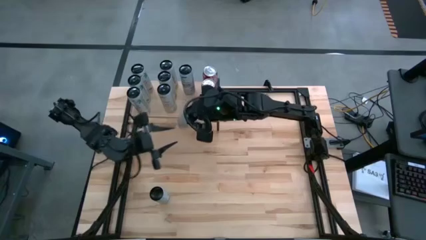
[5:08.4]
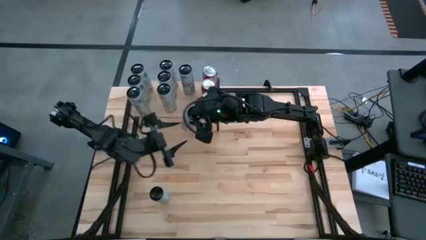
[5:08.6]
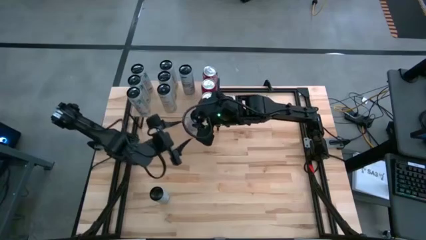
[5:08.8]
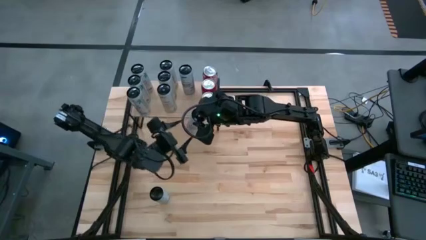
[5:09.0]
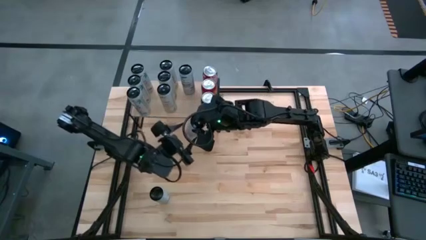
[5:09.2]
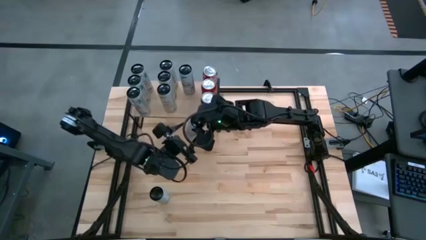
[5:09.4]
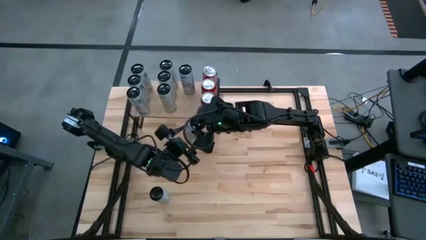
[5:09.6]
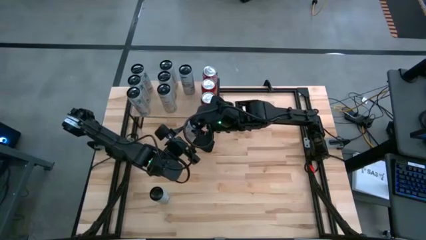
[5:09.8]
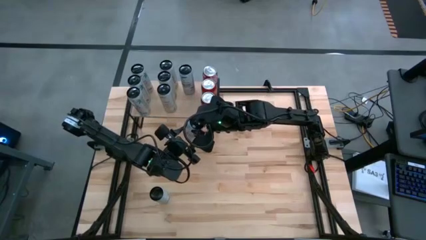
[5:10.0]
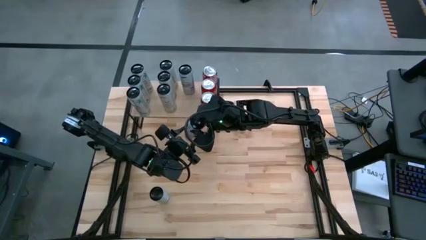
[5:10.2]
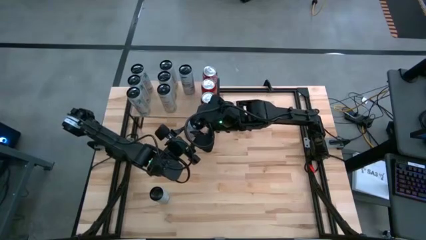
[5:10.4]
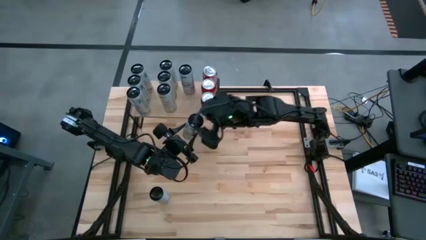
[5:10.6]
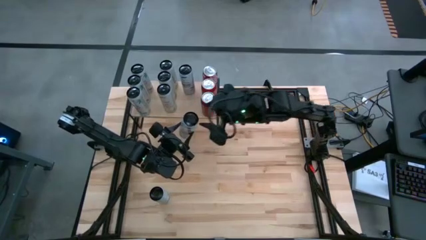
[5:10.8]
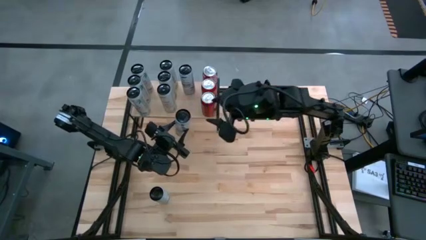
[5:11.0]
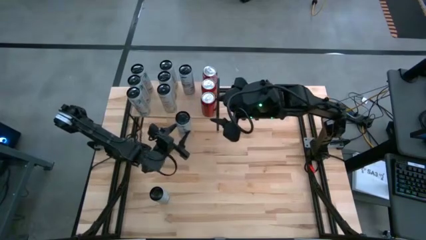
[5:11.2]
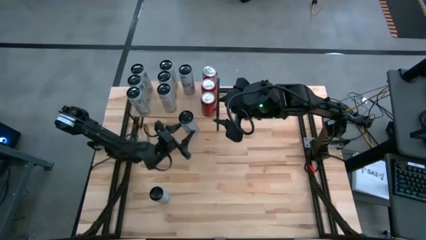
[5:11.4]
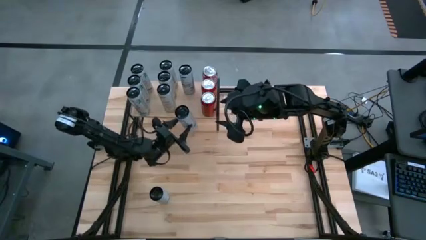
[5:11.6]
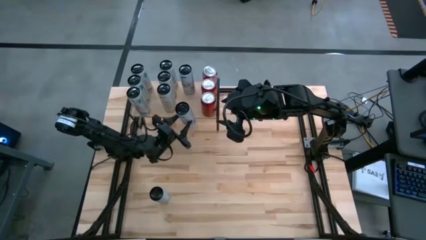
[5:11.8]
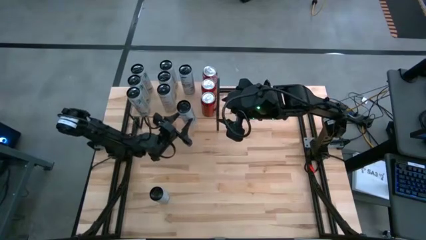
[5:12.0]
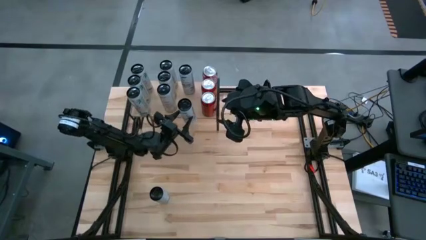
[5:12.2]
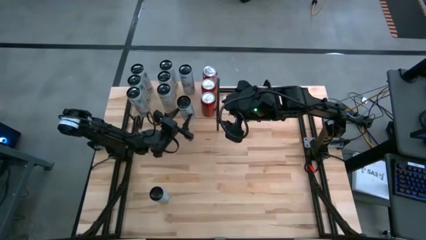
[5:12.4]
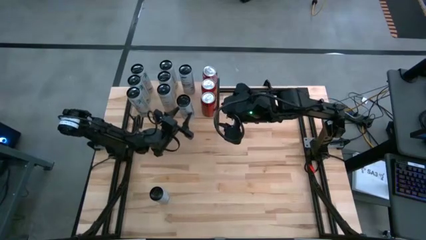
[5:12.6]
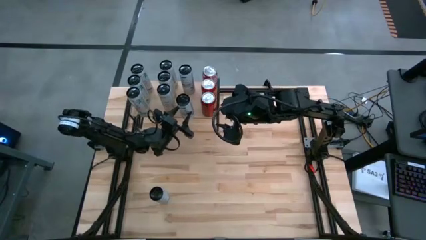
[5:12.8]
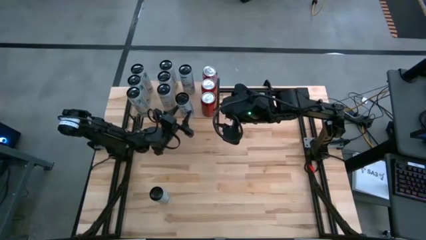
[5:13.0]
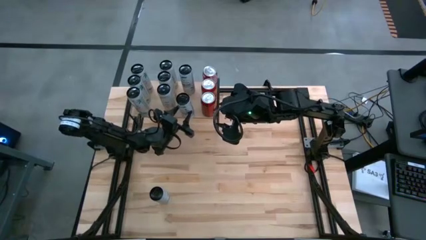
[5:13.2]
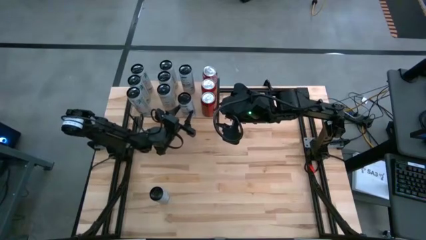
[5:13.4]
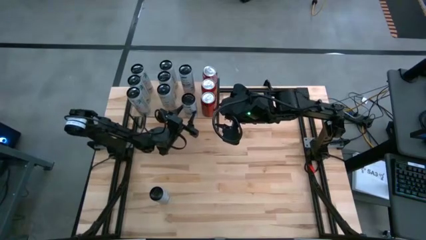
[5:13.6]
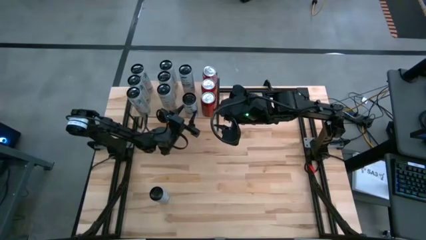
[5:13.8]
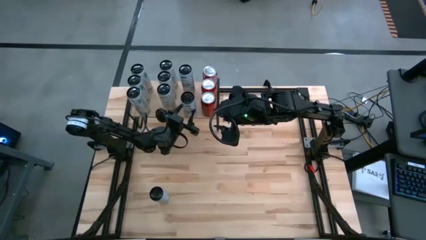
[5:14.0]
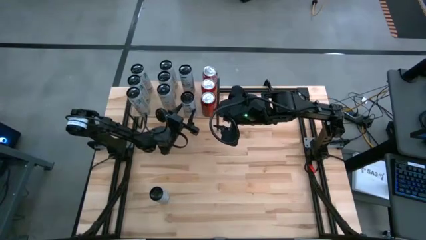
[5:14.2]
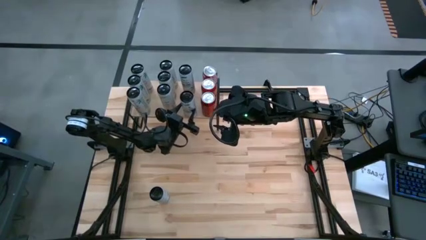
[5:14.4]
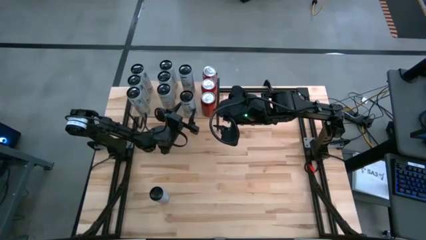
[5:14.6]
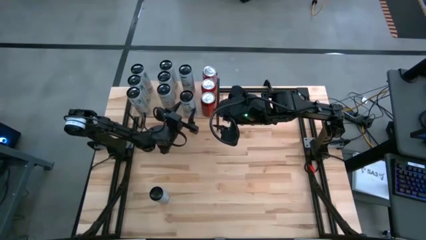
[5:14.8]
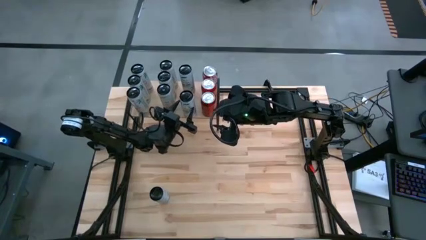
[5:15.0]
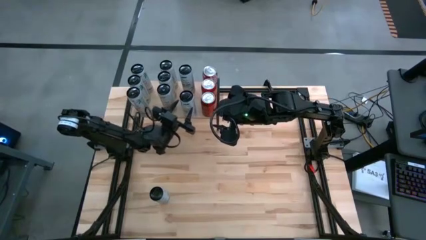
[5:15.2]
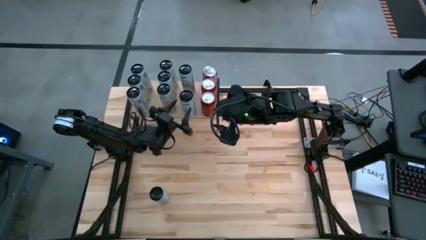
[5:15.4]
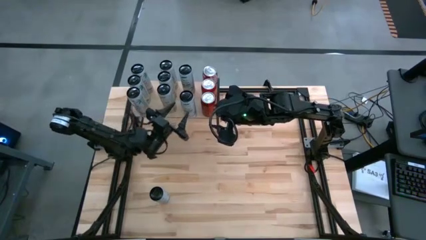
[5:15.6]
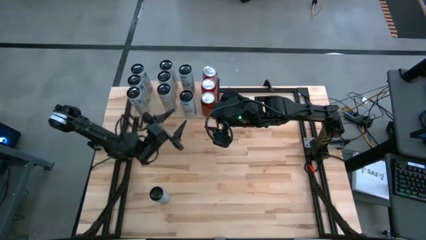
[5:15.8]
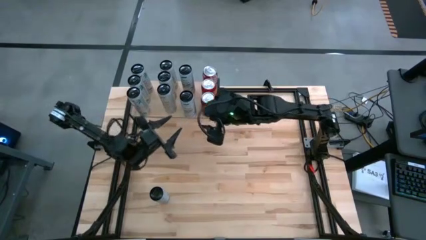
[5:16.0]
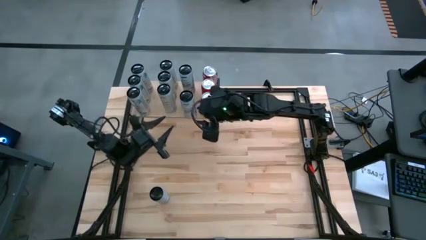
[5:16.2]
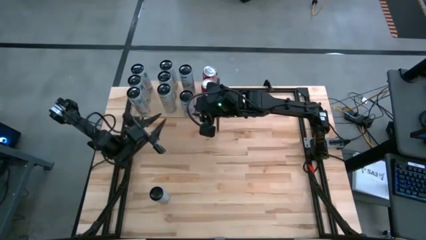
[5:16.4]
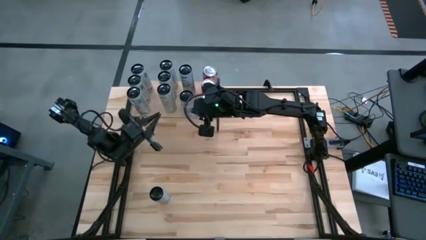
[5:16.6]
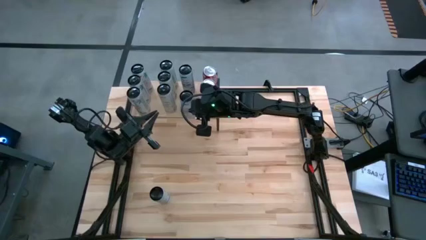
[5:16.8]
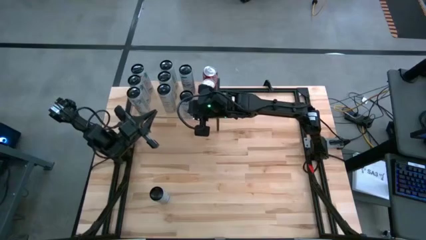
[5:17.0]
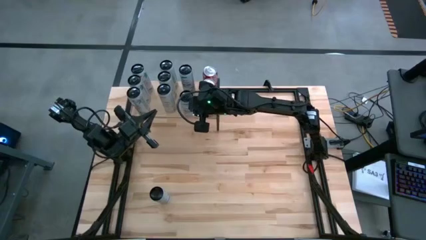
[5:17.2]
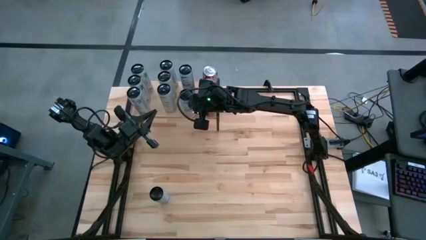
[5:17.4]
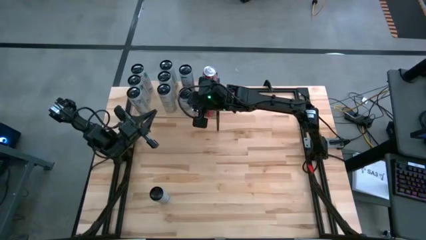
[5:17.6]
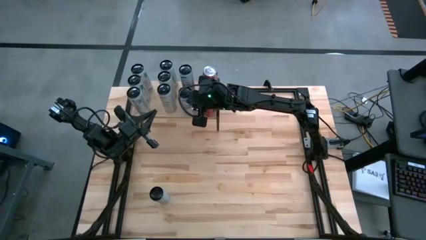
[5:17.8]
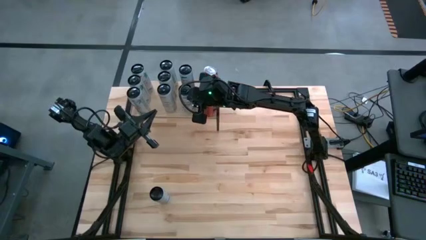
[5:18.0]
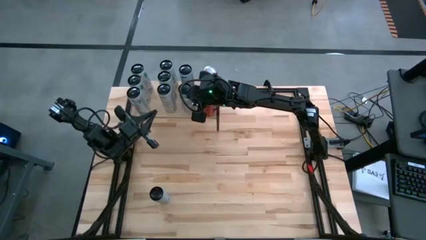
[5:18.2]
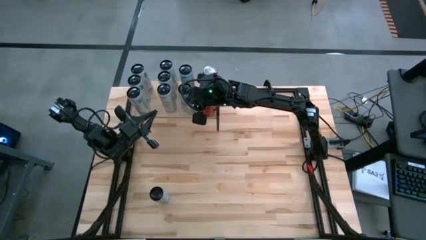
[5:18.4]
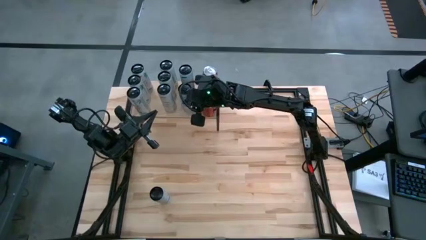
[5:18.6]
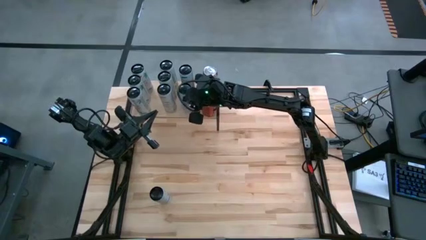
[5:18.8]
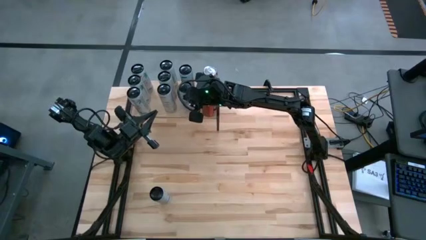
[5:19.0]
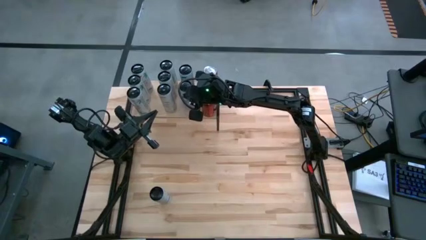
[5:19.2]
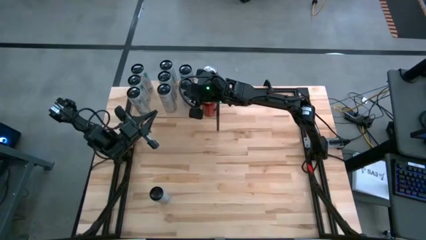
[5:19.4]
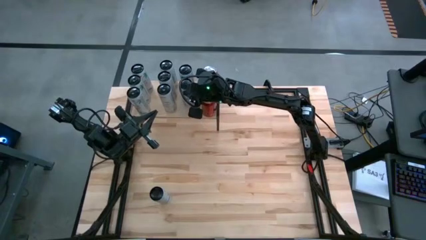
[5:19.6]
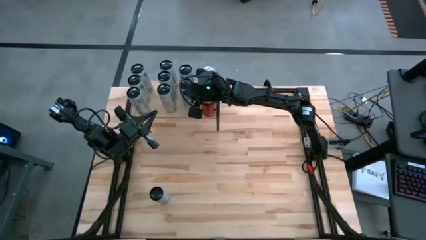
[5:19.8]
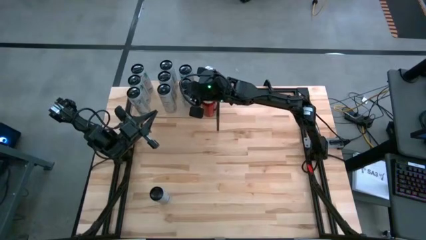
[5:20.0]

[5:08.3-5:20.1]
Task: Place canned beverage on shelf
Put the right white blue soda can on the shelf aligned with the other white blue soda can

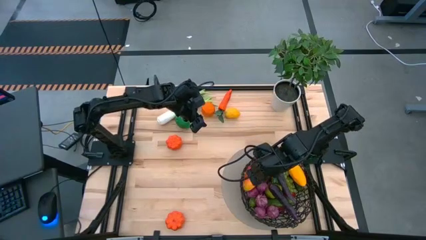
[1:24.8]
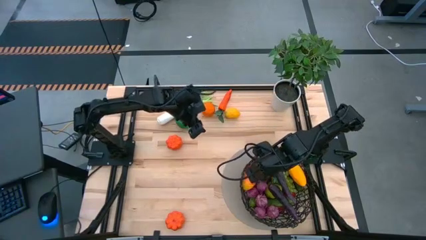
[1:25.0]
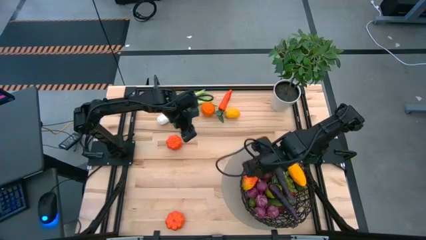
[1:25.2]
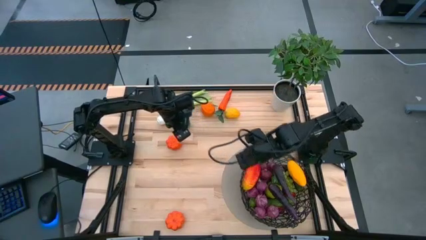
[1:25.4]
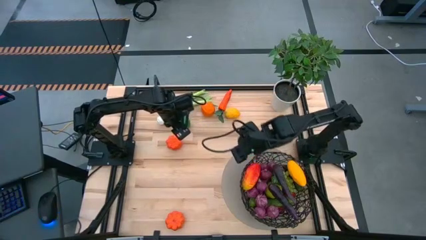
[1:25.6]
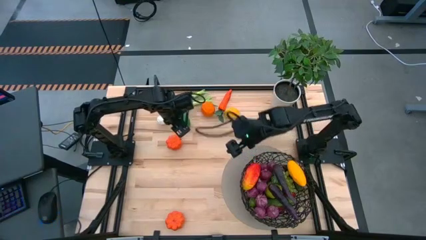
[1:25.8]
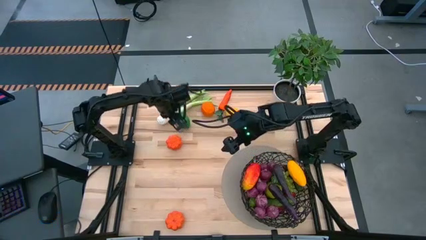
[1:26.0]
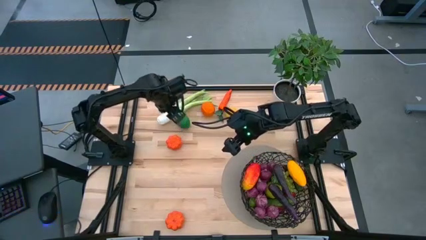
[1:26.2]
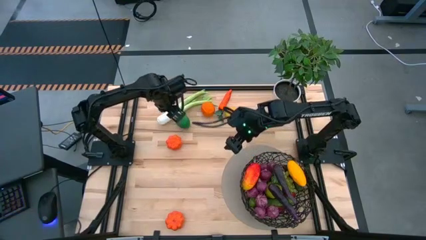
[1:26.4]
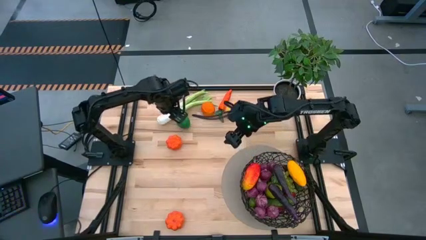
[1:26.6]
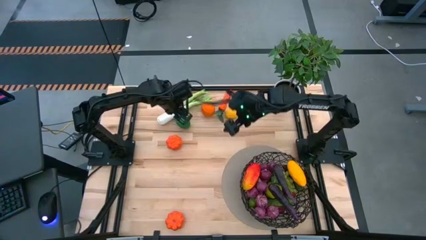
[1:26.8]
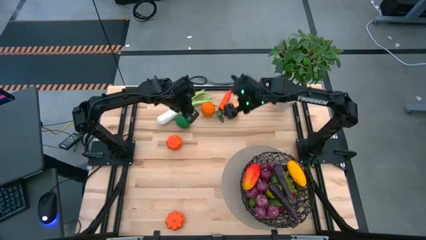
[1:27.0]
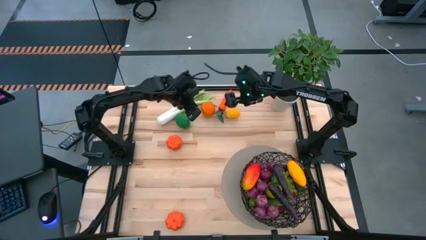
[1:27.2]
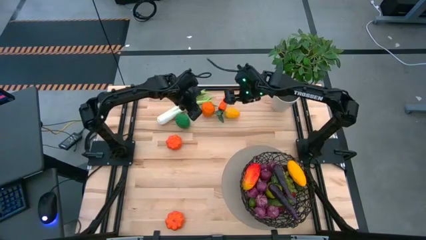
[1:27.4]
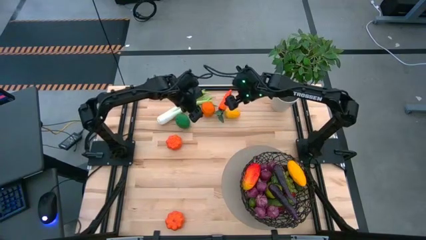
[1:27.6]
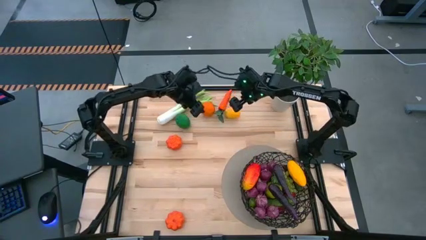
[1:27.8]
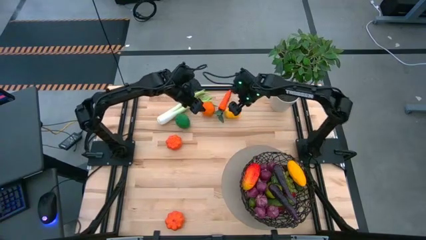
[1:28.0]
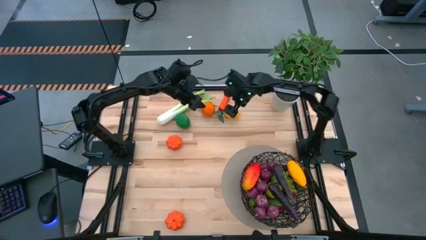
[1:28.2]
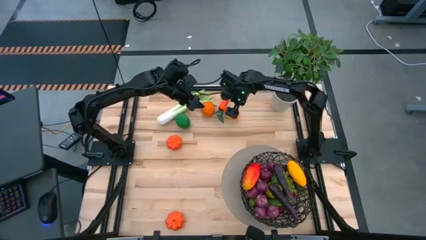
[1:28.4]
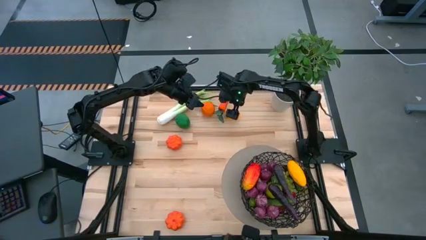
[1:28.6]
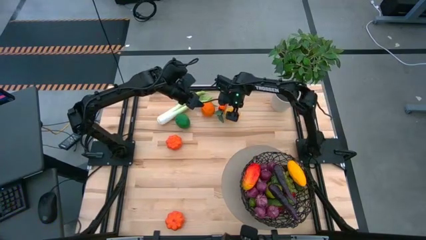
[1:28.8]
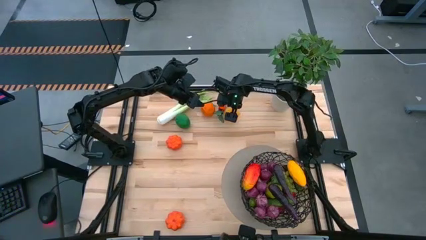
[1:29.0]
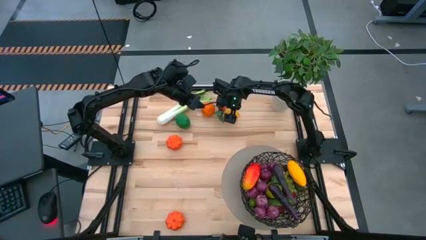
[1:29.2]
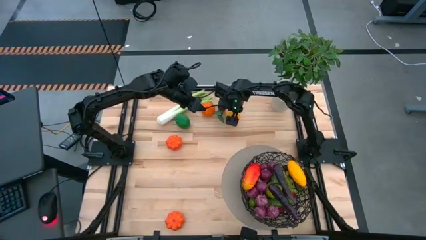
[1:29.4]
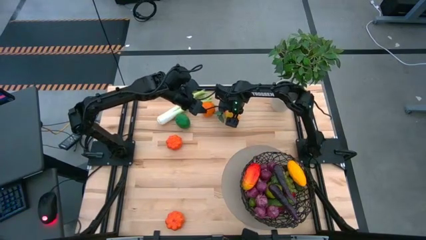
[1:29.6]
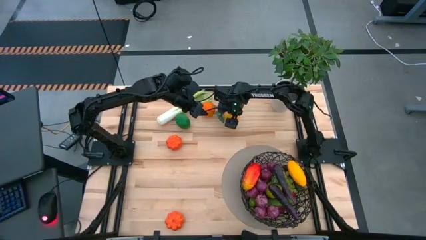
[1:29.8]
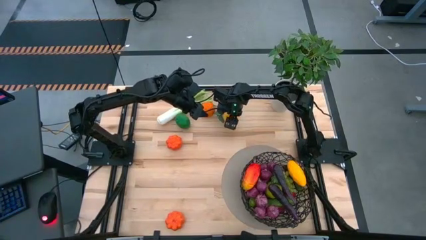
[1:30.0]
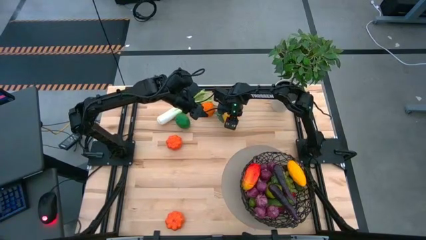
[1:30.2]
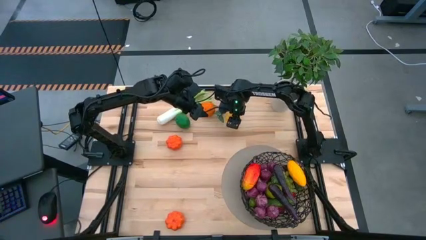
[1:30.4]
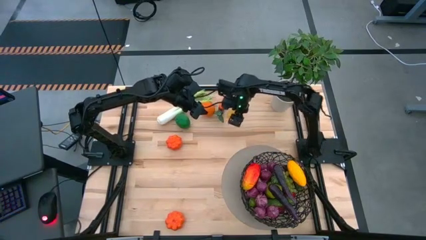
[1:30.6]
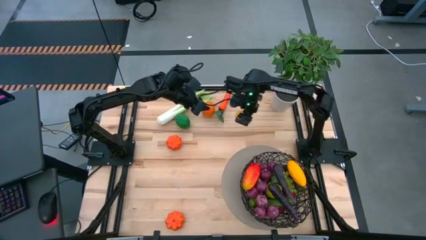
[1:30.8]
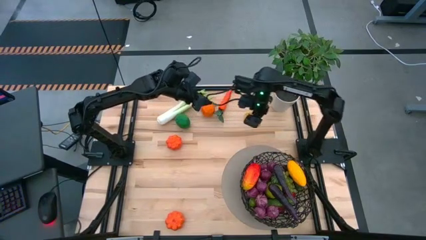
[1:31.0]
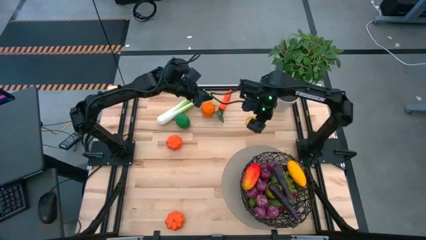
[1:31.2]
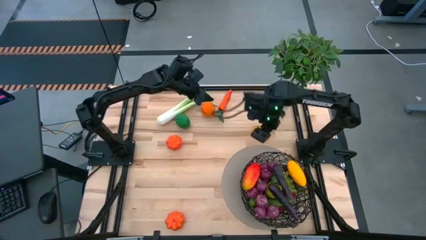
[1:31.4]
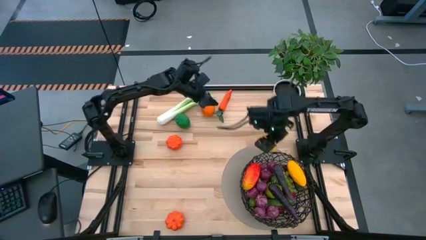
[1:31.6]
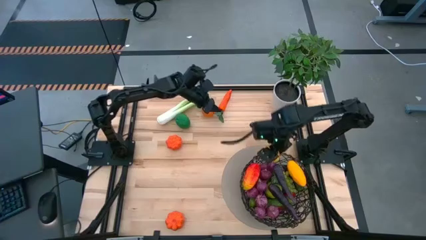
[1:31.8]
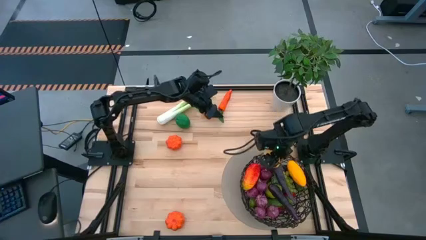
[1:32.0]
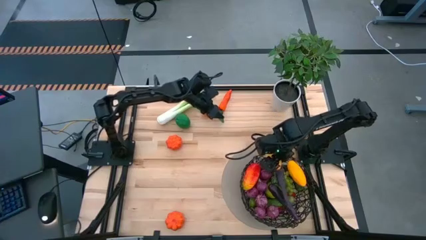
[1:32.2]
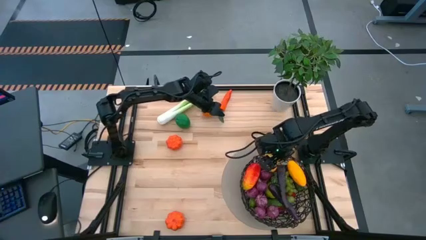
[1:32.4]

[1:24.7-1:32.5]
Task: Build produce basket
Put the yellow lemon into the black basket
